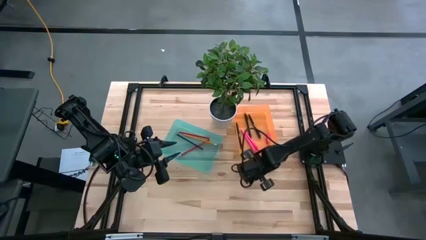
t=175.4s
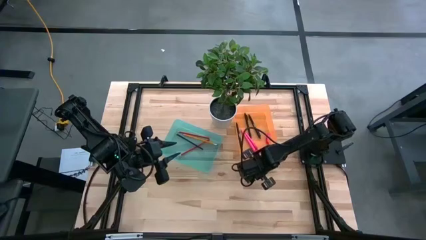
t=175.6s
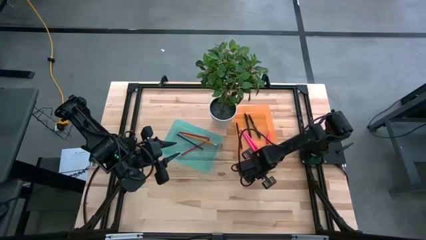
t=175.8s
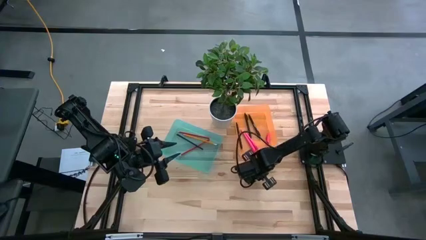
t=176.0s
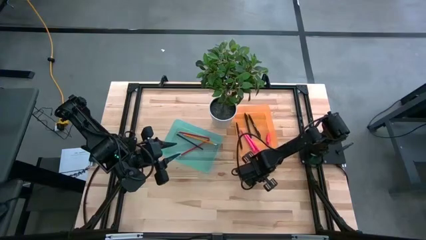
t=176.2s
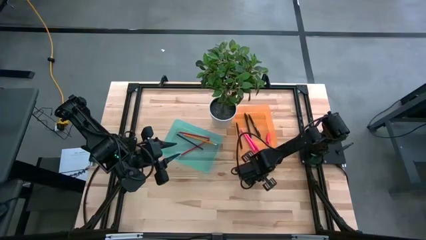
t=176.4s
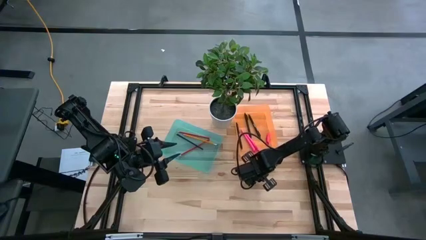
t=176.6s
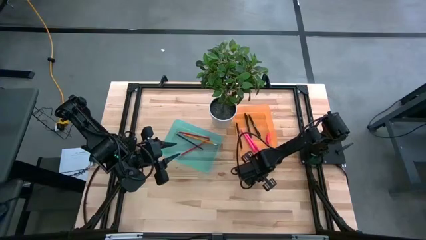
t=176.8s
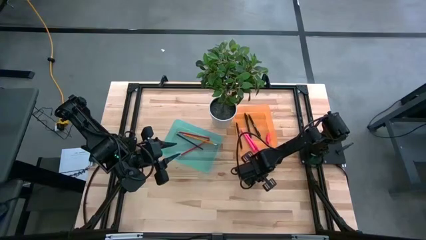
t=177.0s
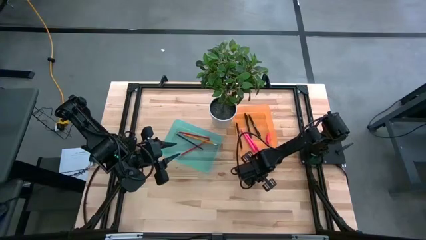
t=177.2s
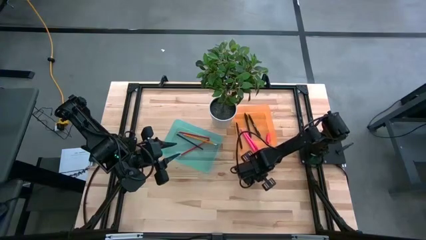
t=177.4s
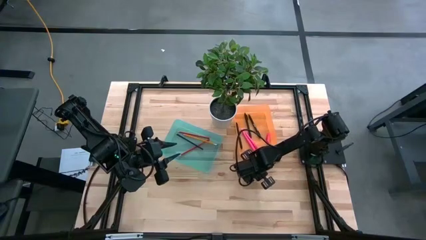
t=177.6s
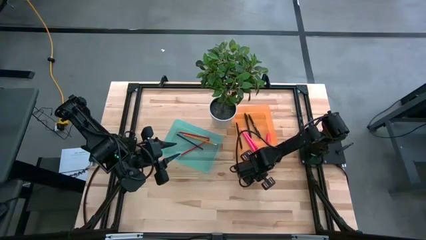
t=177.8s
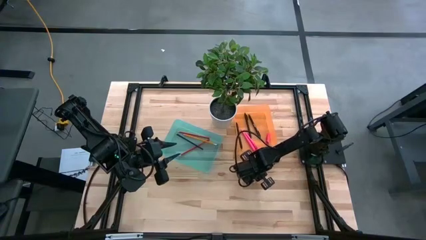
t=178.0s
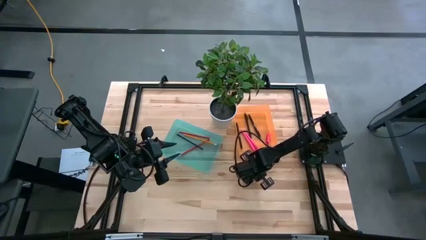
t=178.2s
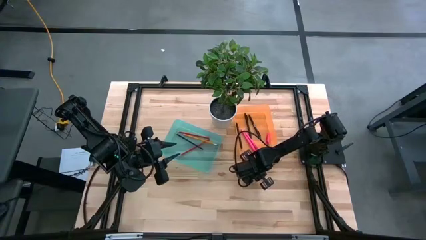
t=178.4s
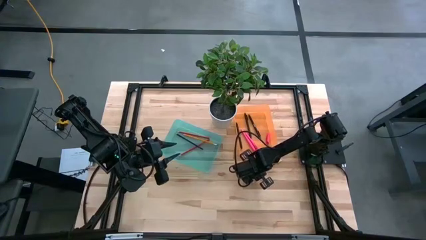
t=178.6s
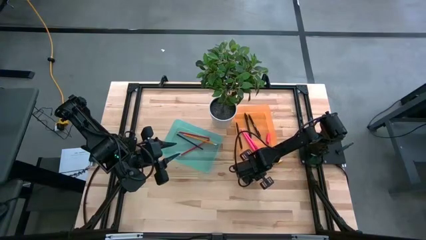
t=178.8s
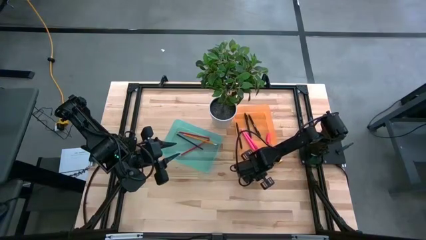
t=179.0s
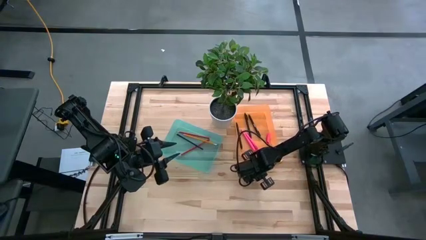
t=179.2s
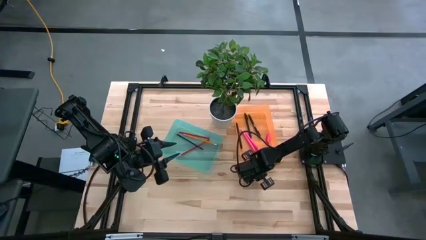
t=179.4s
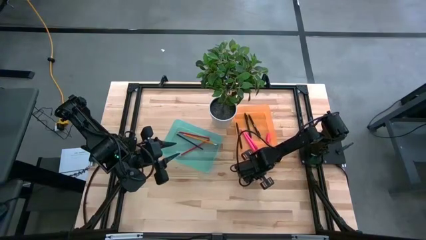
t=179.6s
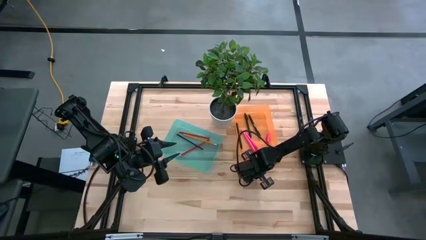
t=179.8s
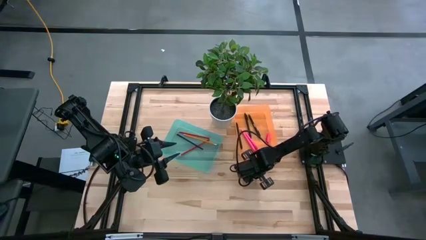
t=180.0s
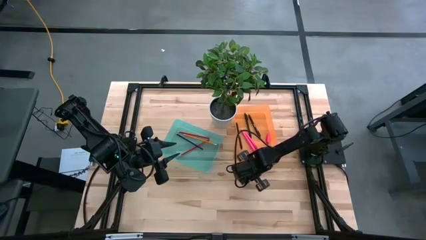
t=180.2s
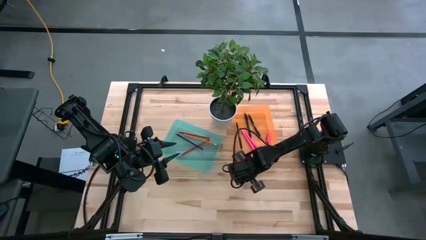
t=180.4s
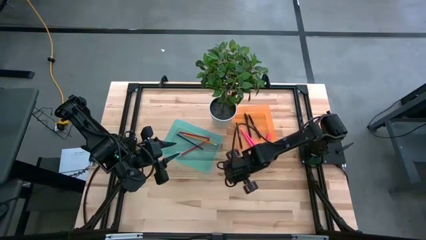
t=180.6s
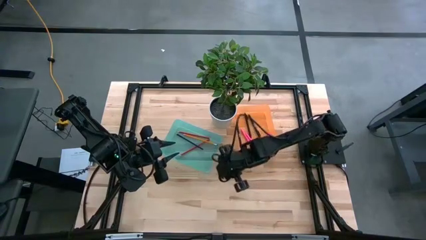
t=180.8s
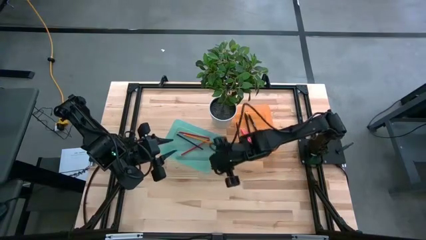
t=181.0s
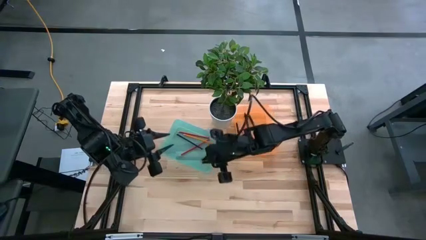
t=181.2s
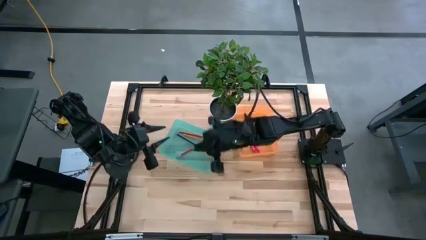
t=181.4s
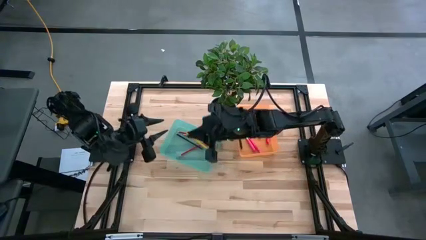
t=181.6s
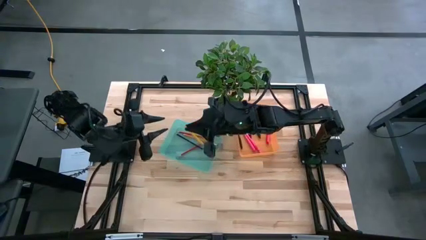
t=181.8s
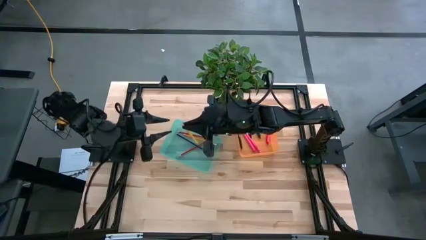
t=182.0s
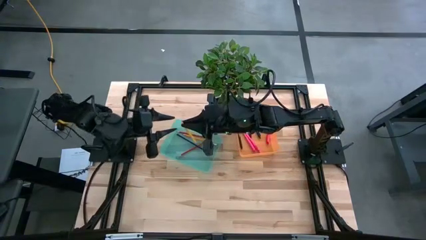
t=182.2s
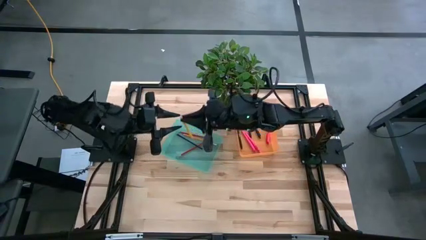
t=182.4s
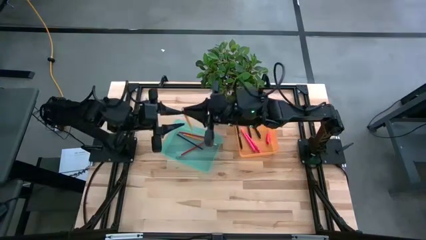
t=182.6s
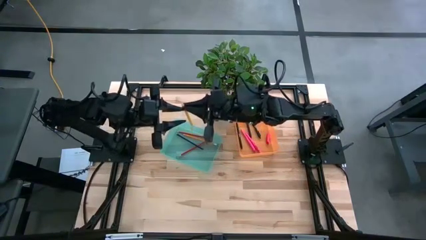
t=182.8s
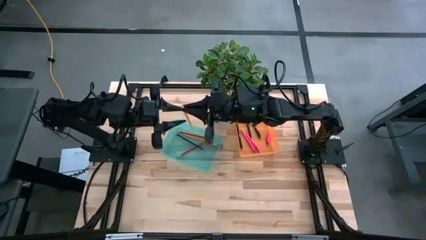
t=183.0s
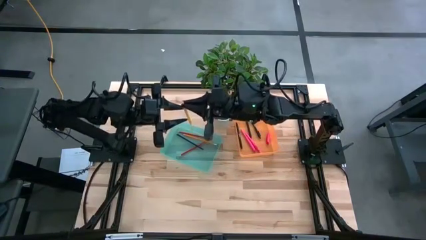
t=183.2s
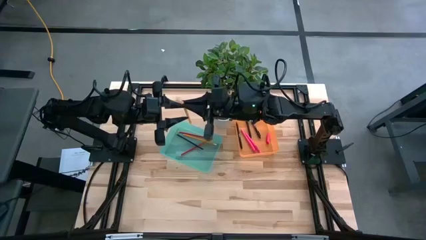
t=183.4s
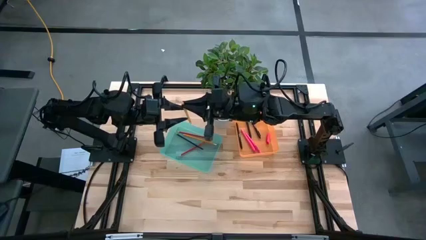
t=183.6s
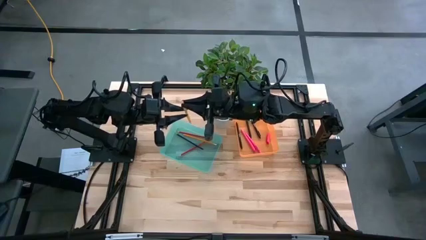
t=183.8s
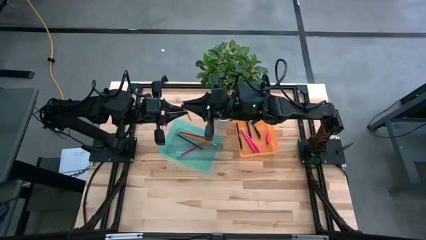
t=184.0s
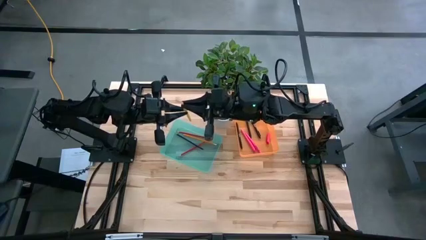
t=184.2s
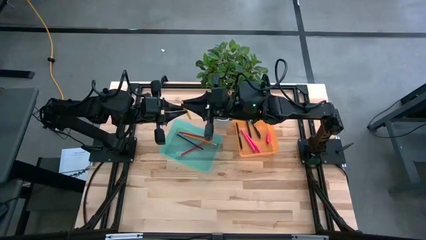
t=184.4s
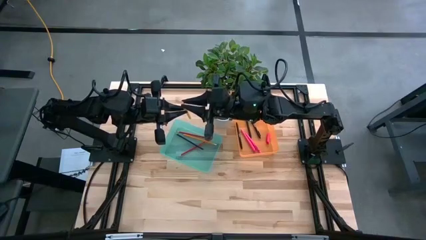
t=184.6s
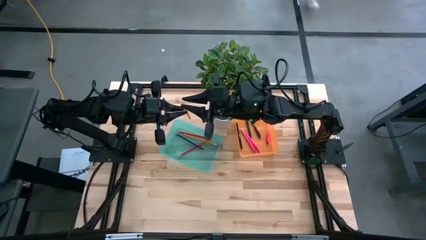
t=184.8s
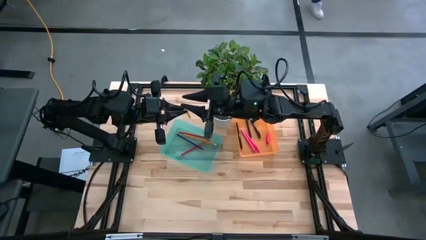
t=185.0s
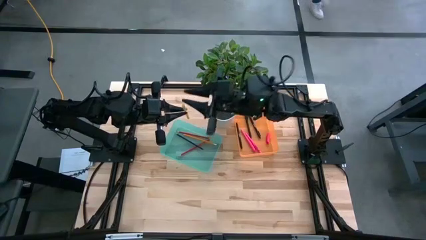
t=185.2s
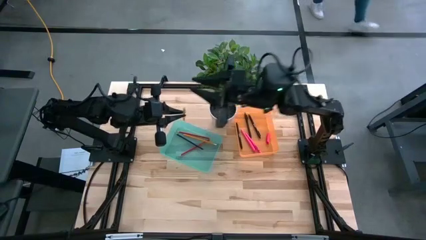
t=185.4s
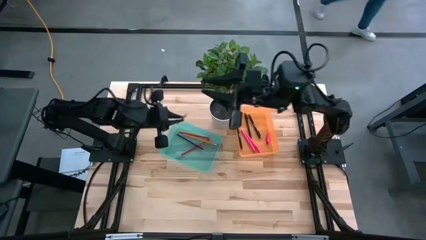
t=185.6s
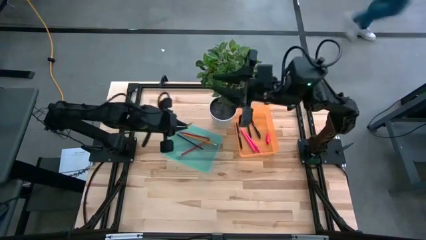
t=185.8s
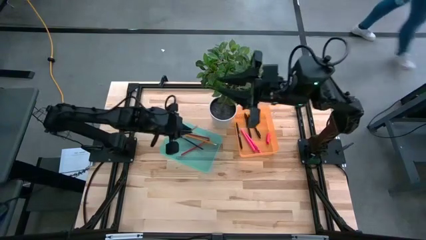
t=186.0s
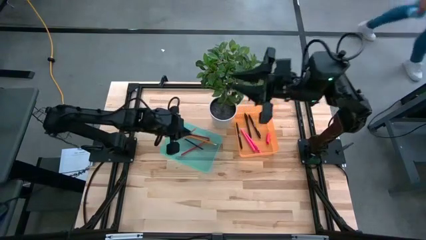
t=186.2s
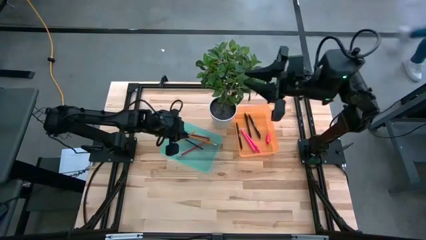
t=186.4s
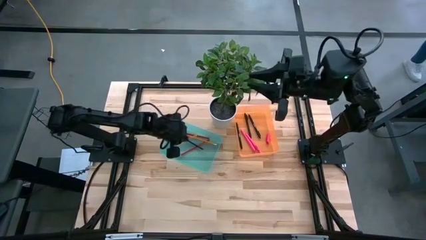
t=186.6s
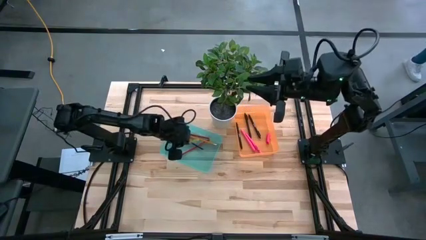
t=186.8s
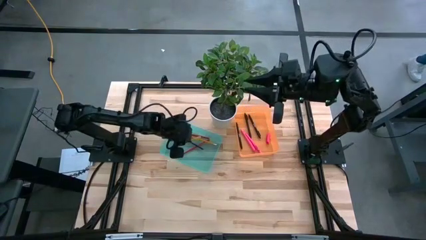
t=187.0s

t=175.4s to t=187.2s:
Task: Sort pens & pencils
Put the yellow pencil into the blue bin
